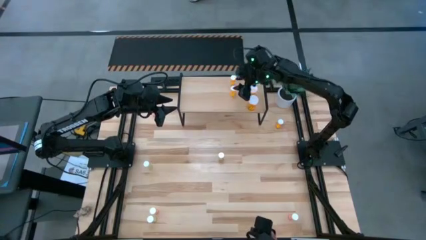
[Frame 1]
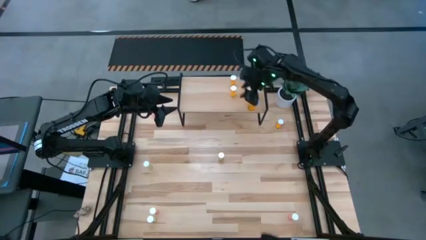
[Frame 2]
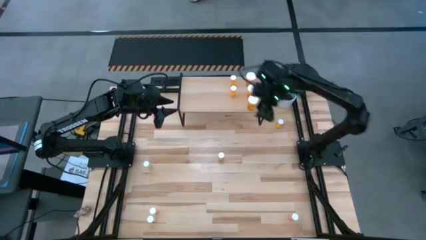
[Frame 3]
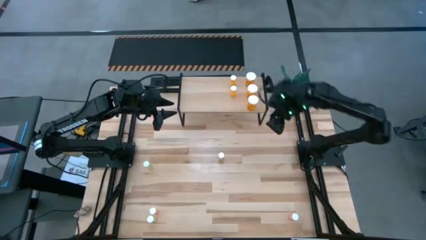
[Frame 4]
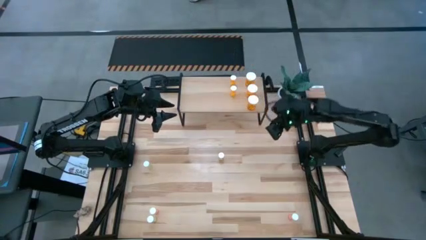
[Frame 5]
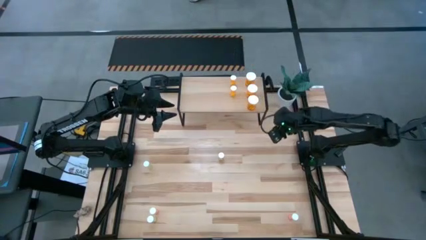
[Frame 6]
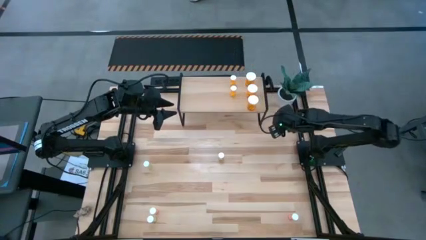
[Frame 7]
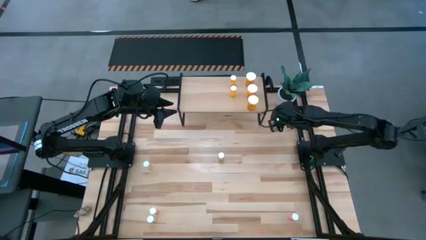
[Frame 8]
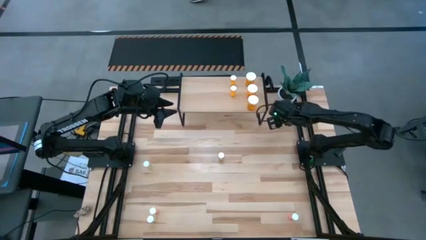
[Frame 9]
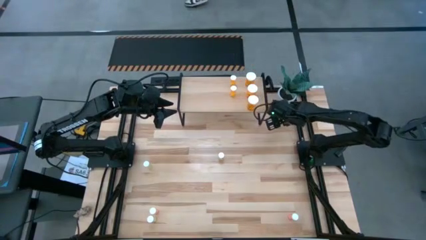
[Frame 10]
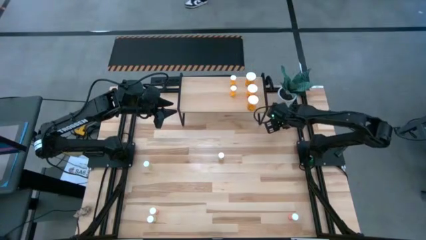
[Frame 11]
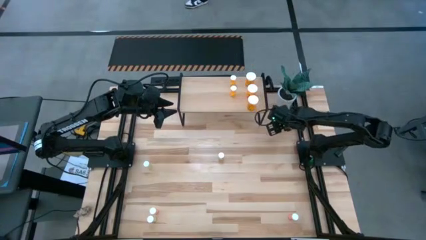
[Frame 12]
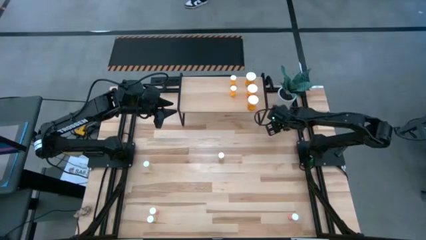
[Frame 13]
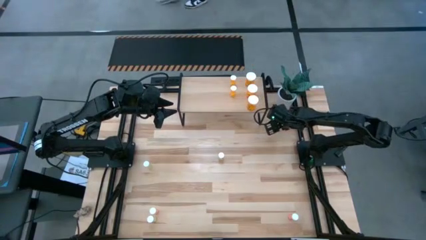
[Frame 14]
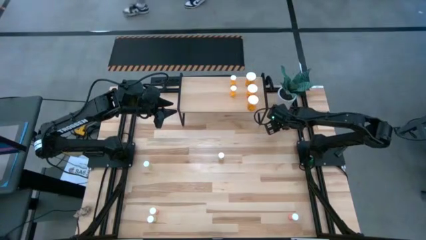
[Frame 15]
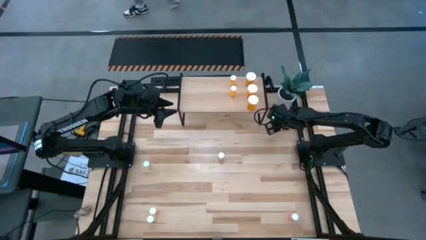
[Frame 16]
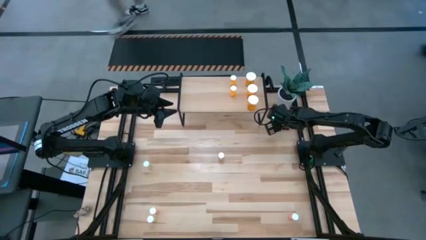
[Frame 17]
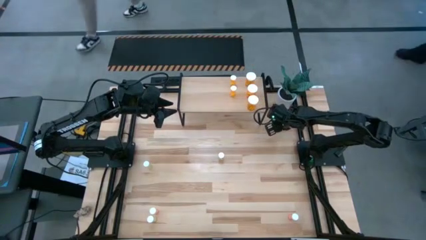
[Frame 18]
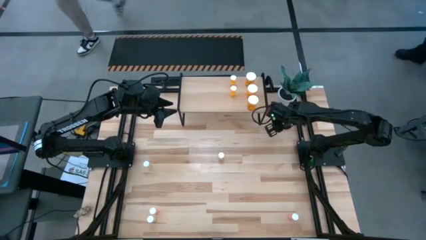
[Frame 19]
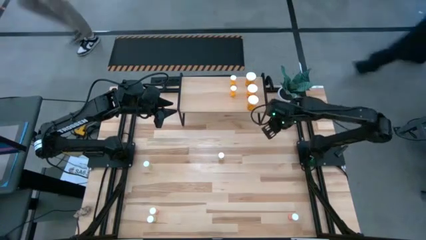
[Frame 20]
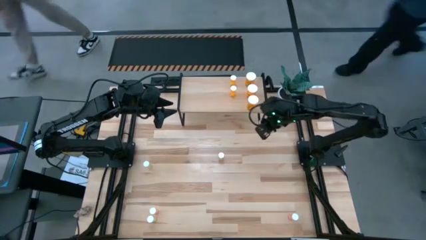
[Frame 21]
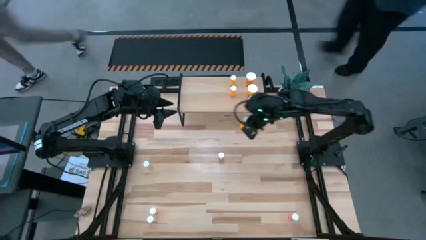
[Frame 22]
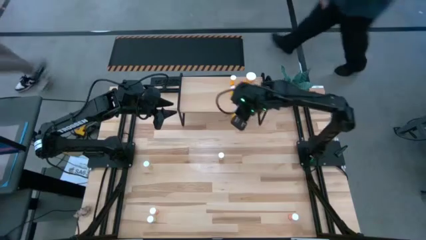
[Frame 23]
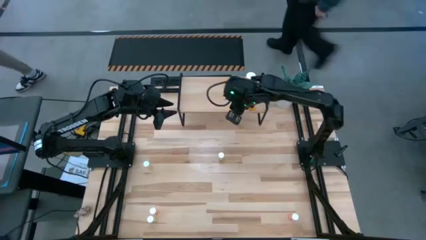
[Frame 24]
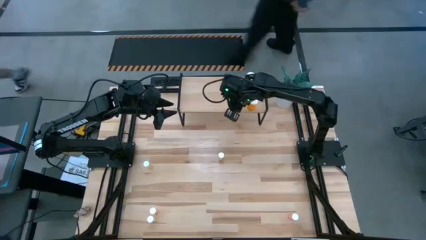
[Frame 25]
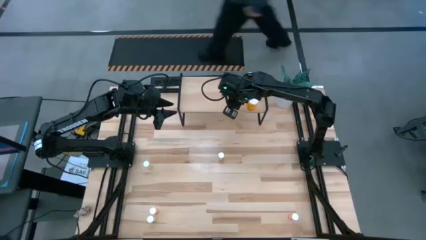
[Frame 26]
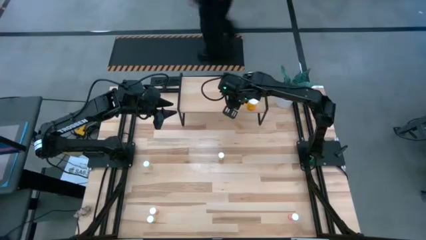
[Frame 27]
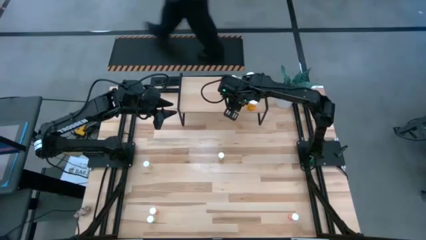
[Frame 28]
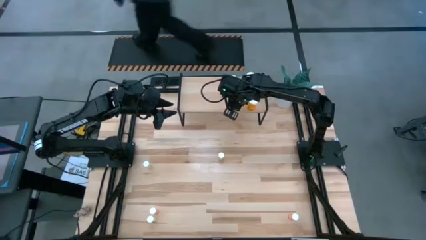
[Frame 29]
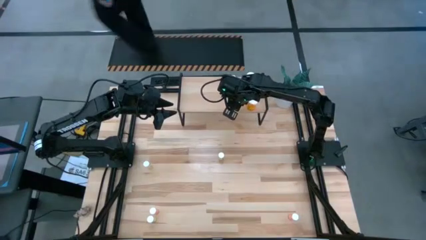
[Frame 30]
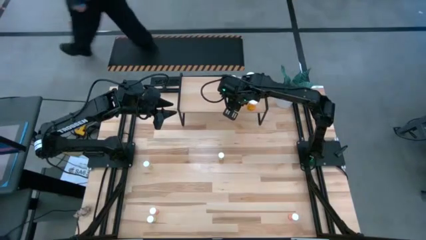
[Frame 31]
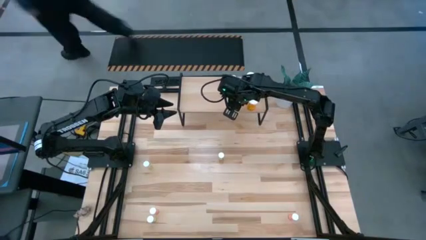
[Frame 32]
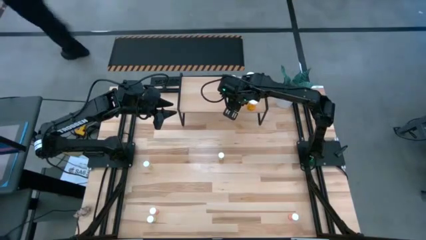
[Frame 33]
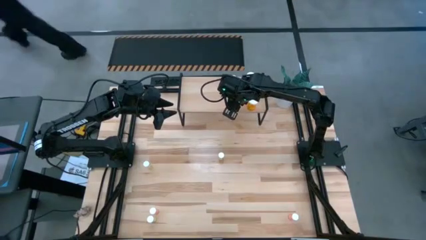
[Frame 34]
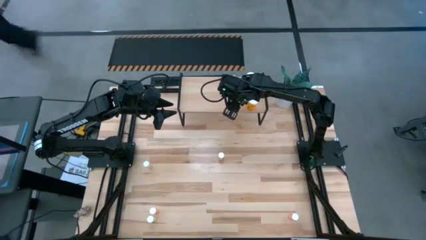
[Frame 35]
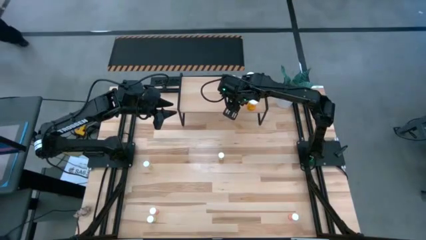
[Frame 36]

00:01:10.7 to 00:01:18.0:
Task: Pick and place medicine bottles onto shelf by color
Put the small orange pill bottle on the shelf aligned with the other small orange pill bottles

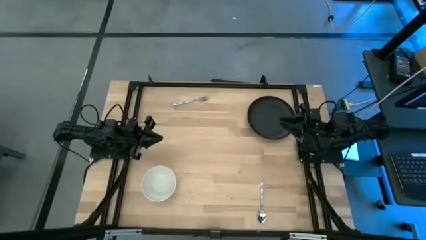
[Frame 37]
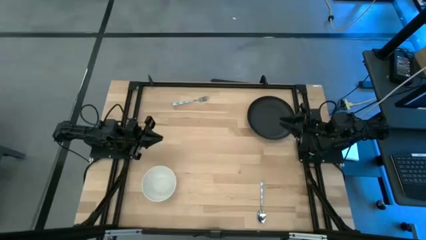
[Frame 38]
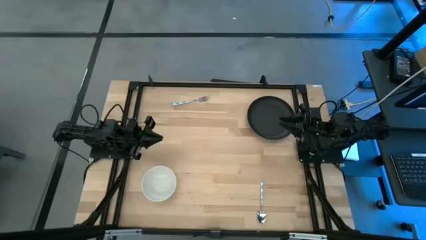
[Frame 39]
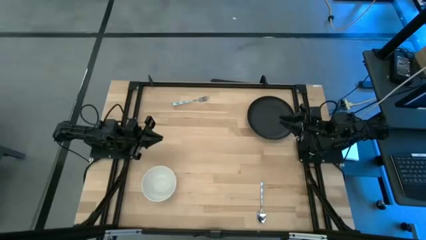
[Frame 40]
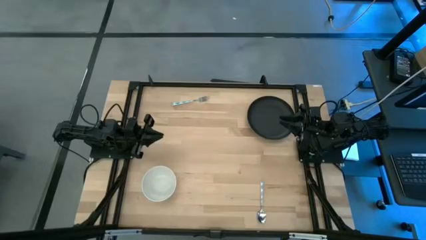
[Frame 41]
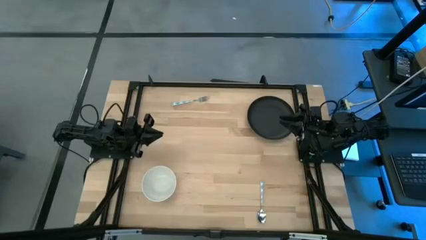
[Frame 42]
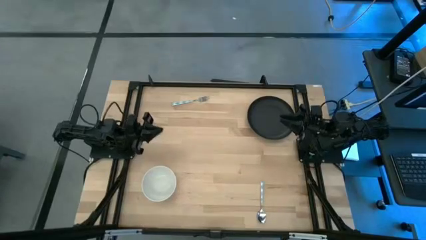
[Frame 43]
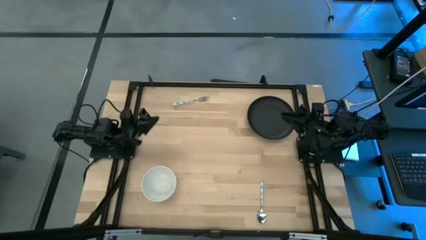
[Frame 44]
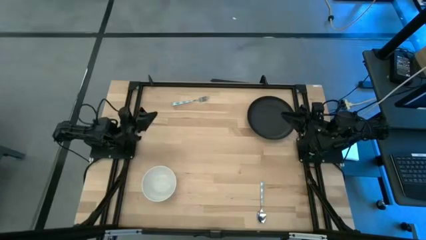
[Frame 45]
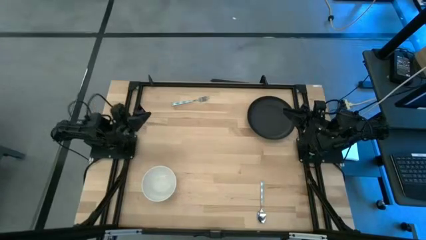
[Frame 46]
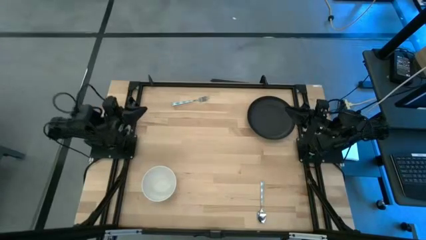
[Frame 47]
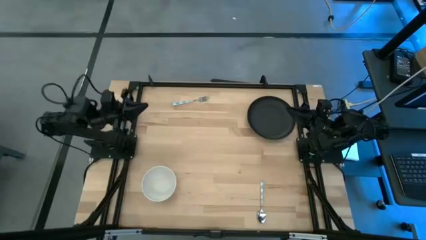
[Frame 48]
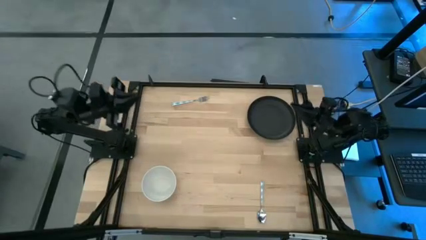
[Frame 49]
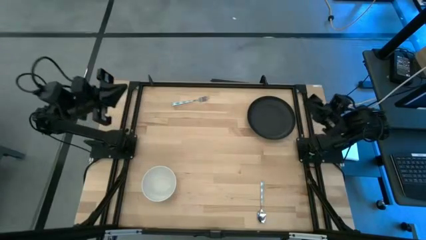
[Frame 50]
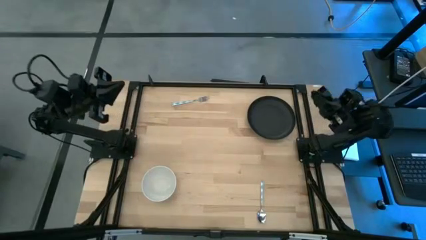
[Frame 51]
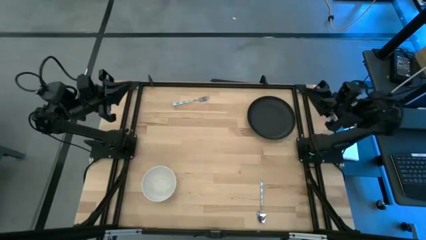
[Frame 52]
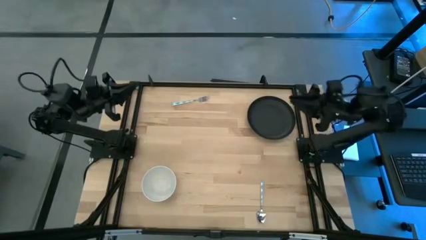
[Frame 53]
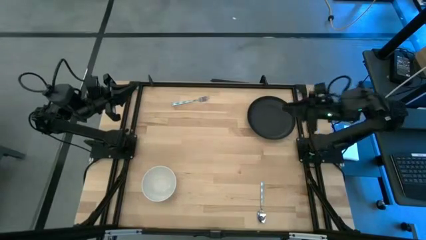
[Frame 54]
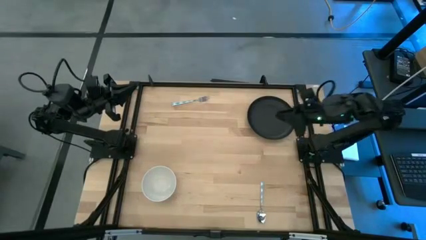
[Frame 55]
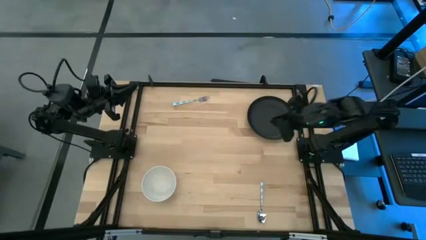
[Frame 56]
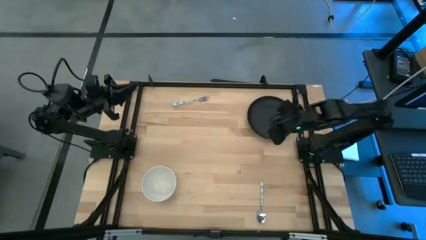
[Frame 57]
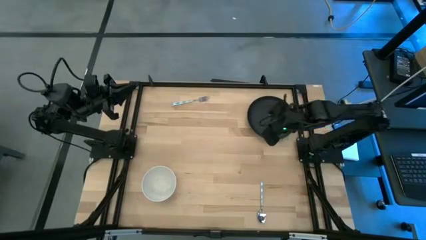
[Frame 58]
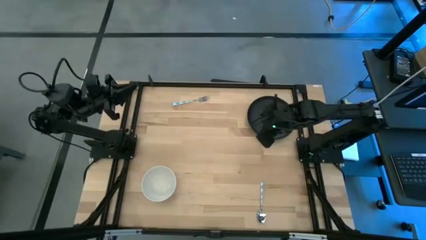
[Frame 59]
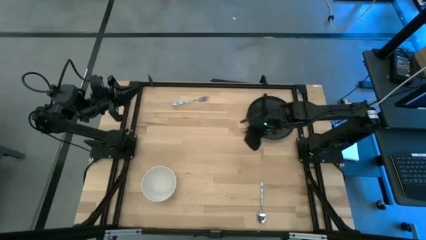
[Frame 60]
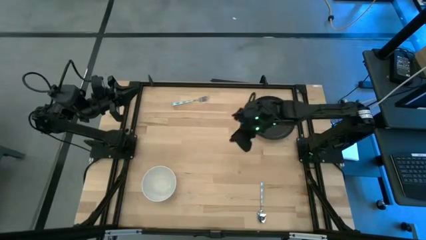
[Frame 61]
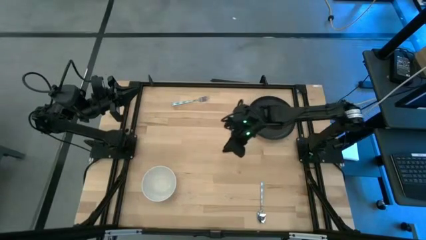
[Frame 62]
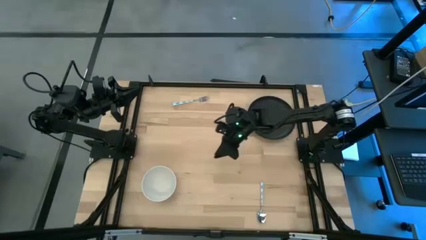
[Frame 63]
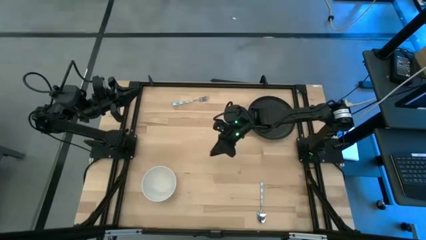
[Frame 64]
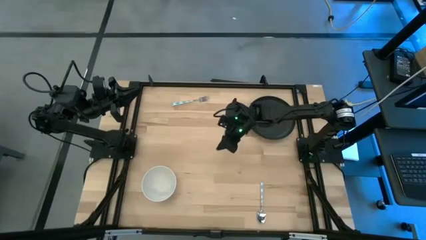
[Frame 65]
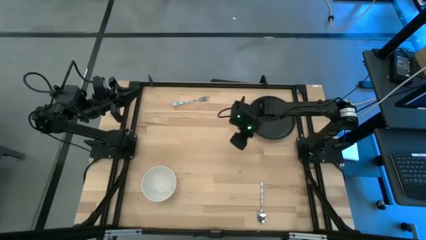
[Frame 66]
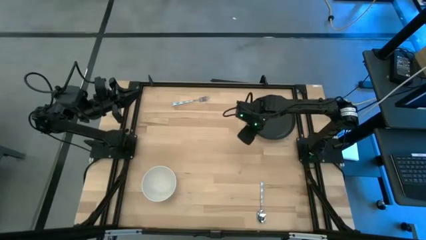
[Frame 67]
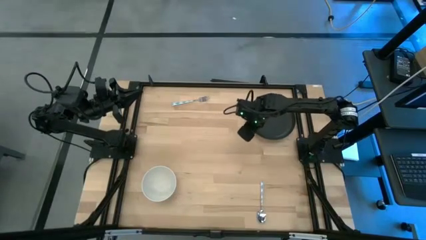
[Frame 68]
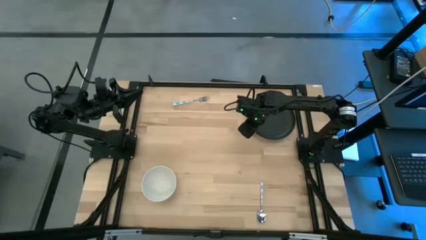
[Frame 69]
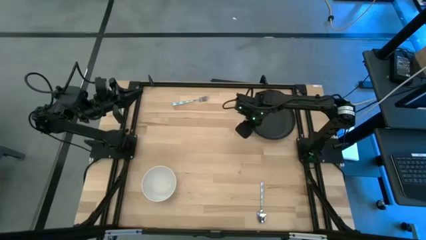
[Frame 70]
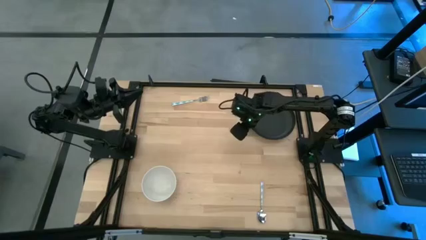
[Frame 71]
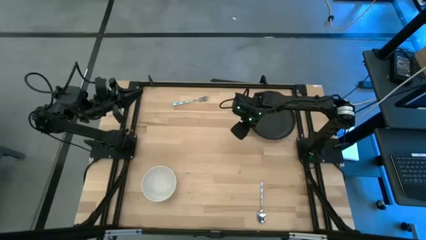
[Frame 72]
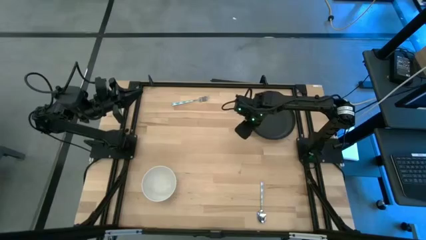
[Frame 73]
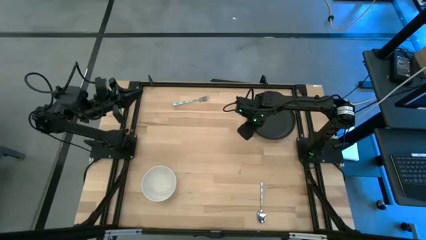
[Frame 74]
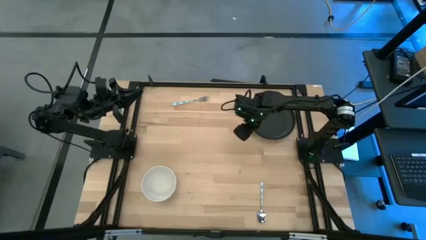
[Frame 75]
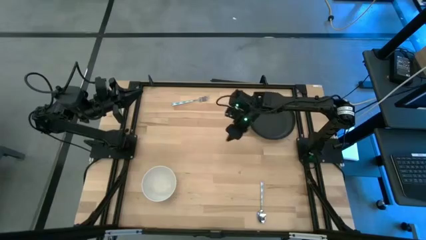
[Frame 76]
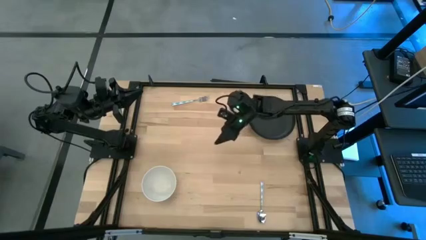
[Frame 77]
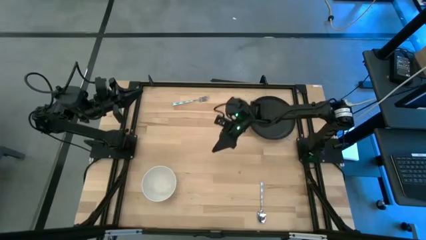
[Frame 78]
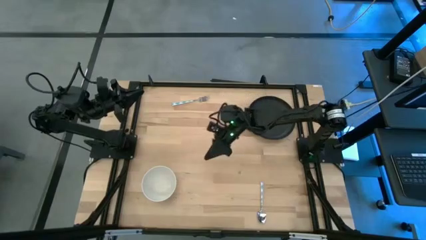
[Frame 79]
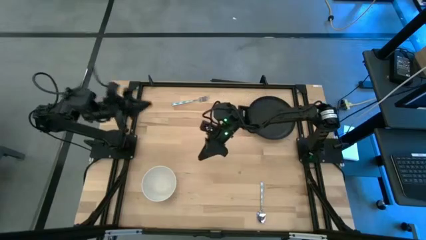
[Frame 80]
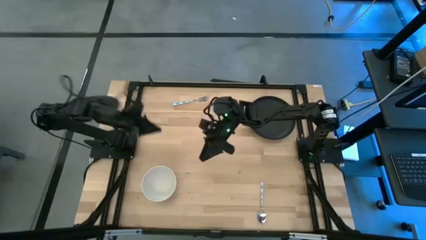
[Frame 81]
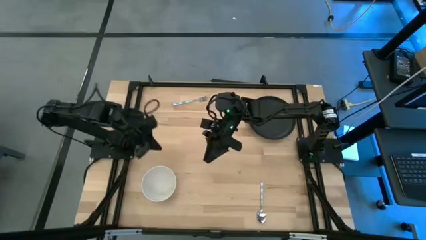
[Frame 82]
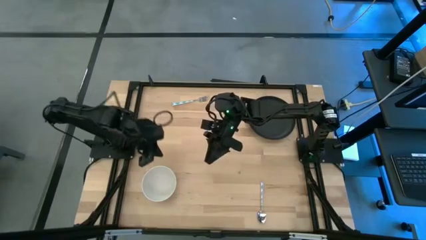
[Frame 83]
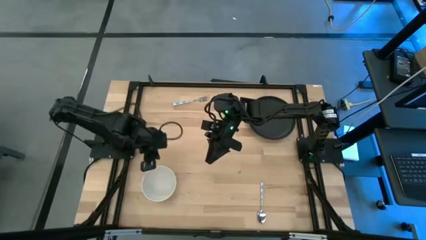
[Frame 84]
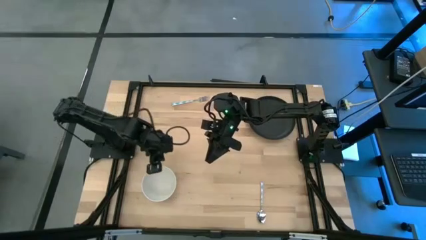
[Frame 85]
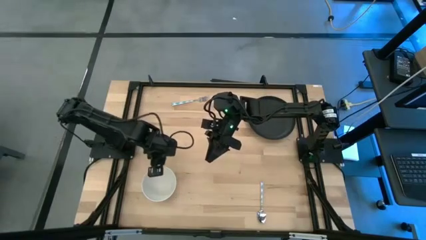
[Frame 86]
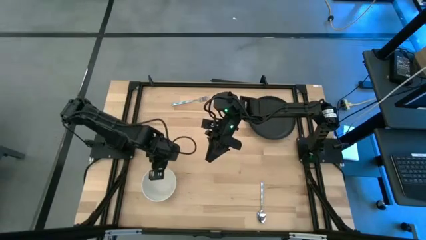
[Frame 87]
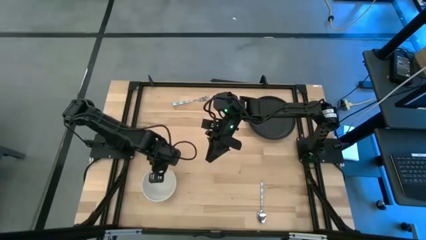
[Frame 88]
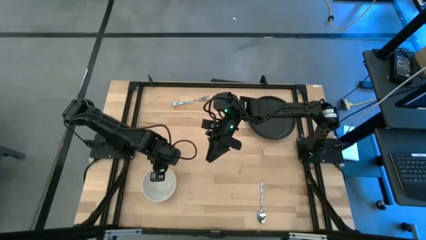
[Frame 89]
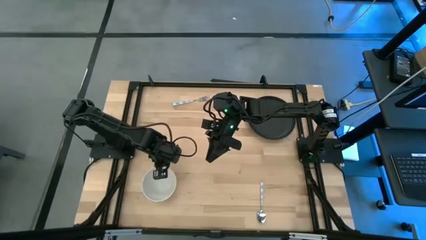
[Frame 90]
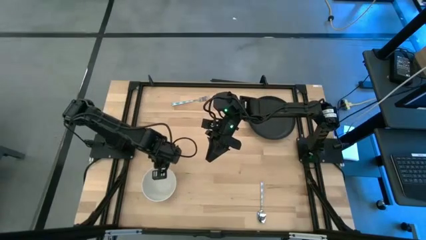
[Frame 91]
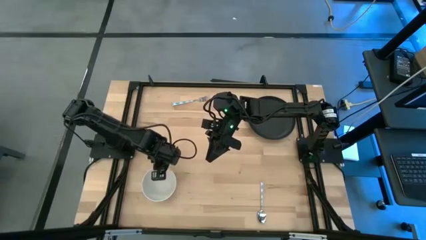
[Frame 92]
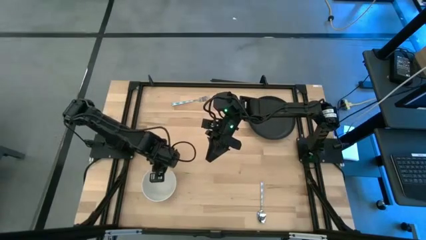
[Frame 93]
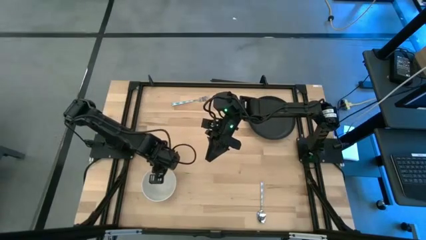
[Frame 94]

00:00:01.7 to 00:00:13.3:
Task: Set table place
Put the white bowl on top of the black plate
